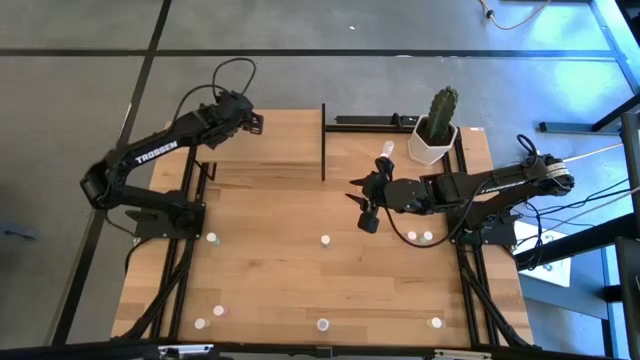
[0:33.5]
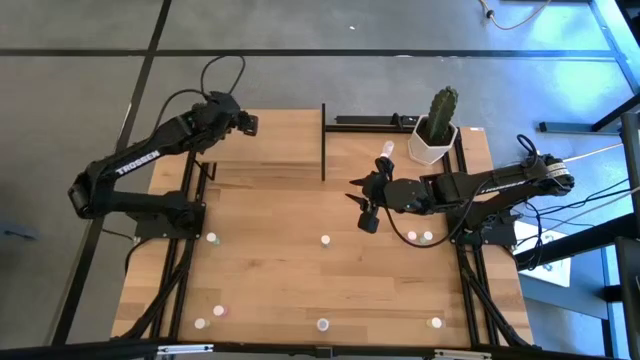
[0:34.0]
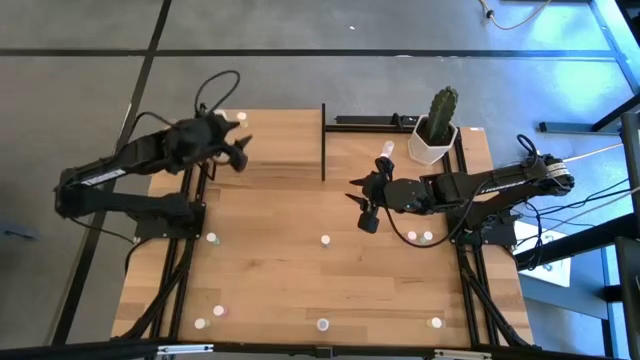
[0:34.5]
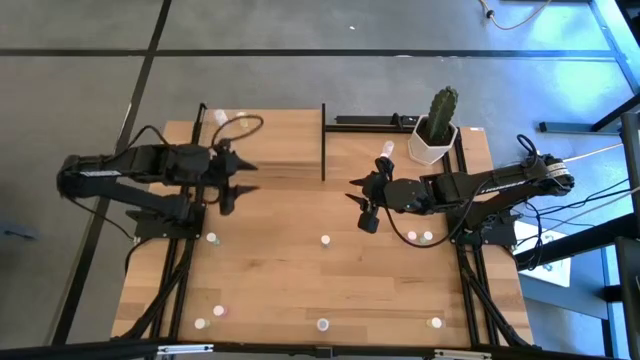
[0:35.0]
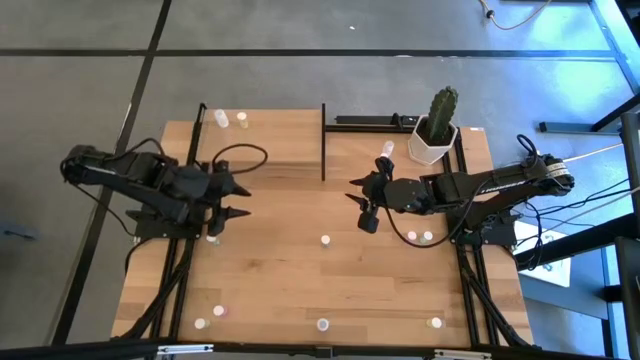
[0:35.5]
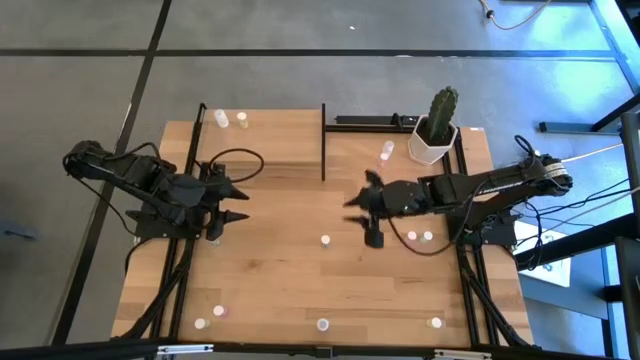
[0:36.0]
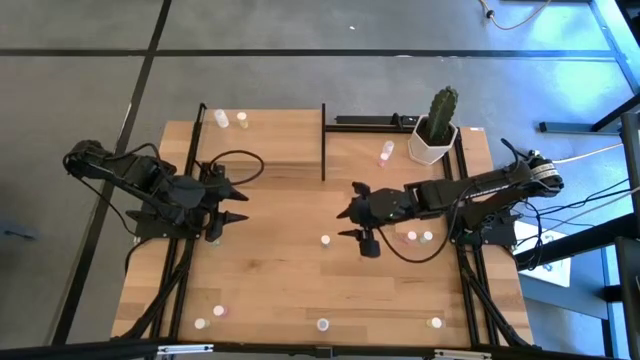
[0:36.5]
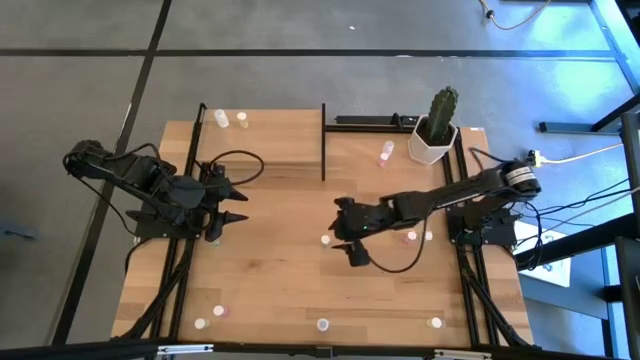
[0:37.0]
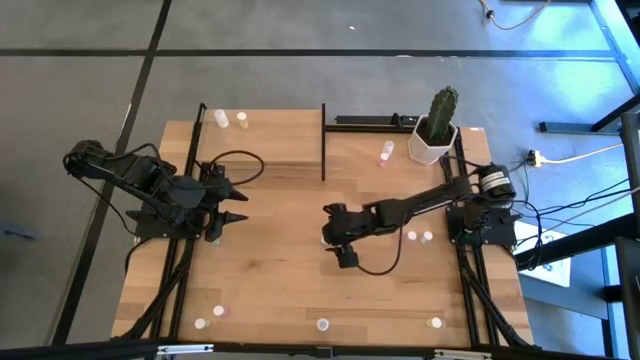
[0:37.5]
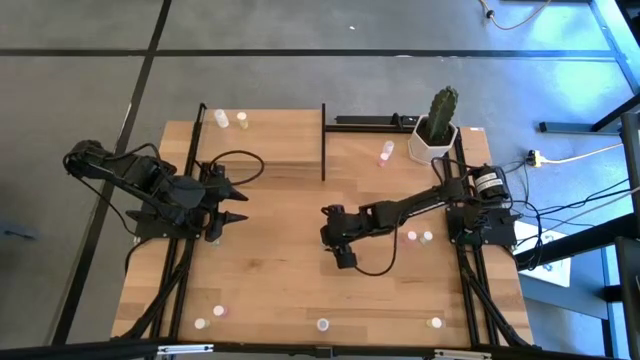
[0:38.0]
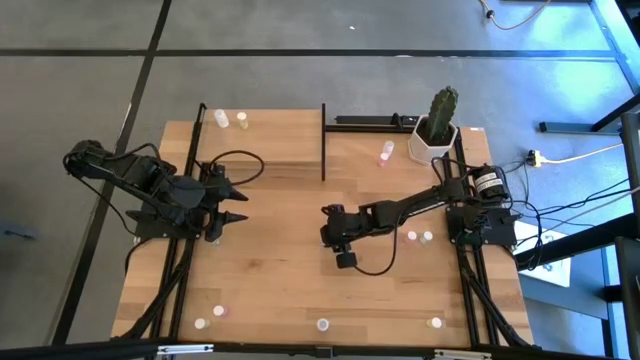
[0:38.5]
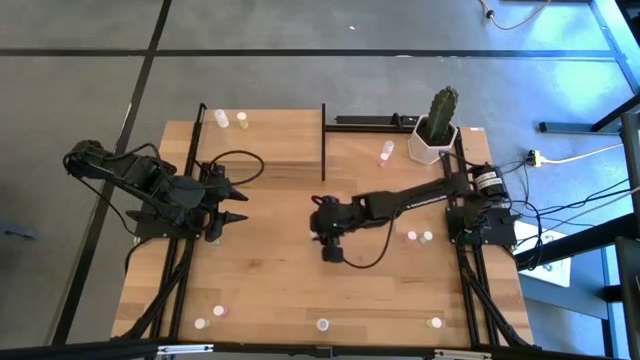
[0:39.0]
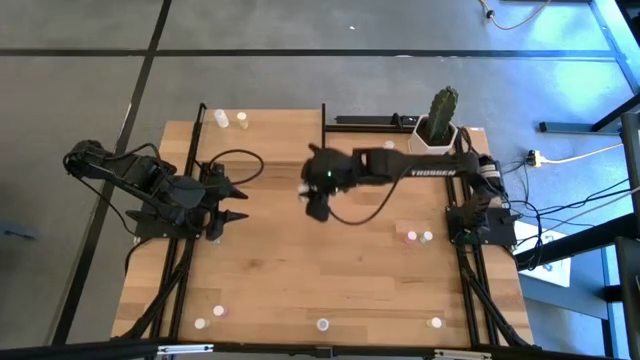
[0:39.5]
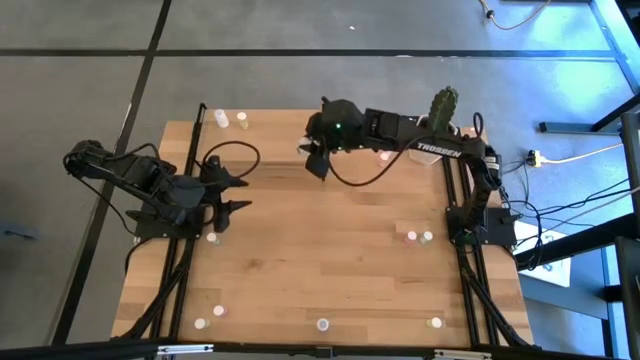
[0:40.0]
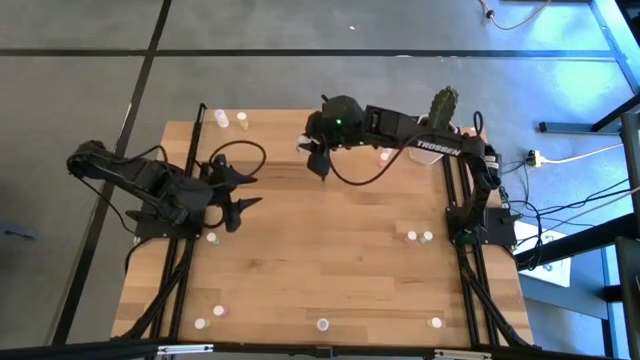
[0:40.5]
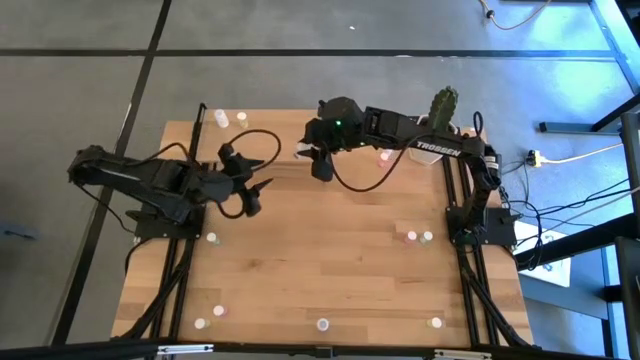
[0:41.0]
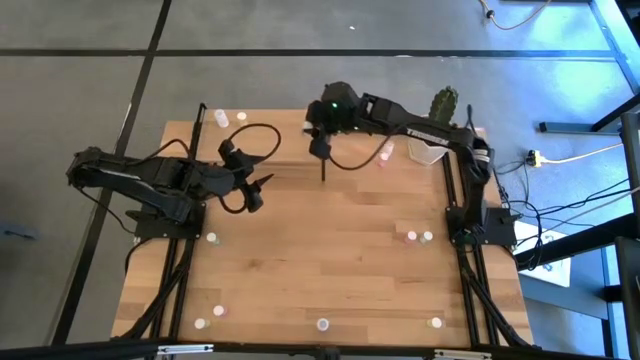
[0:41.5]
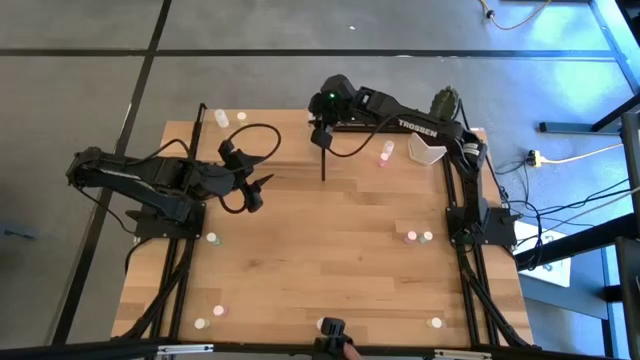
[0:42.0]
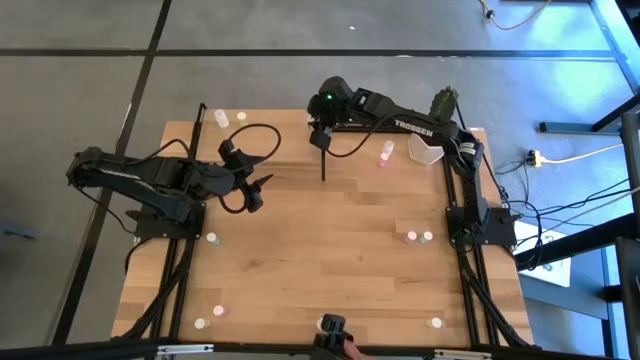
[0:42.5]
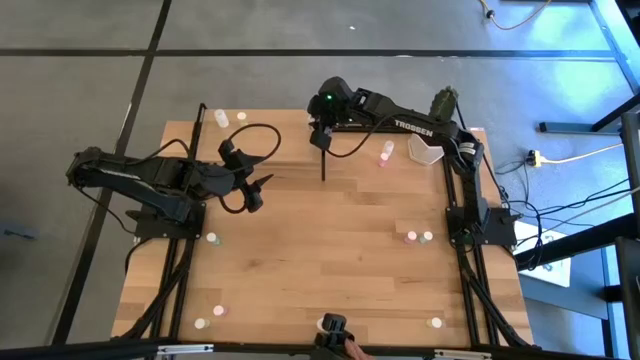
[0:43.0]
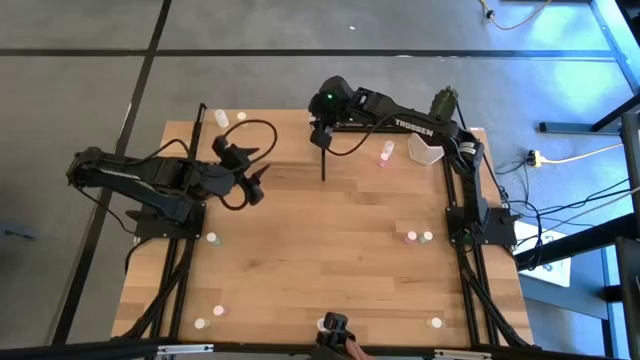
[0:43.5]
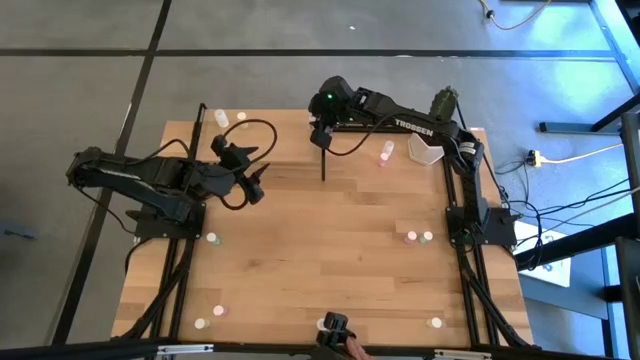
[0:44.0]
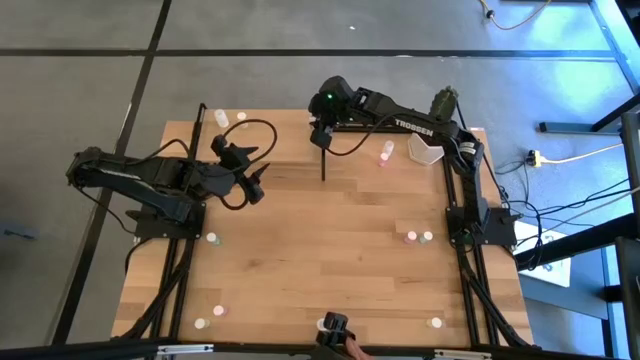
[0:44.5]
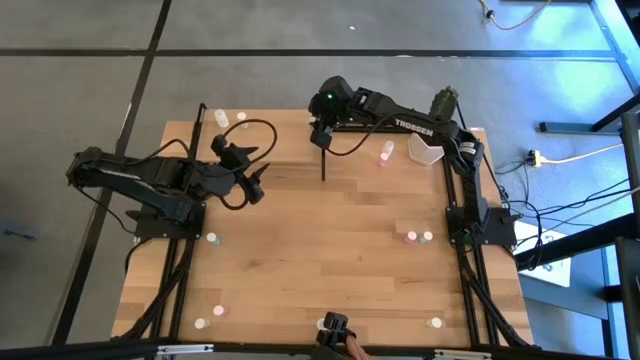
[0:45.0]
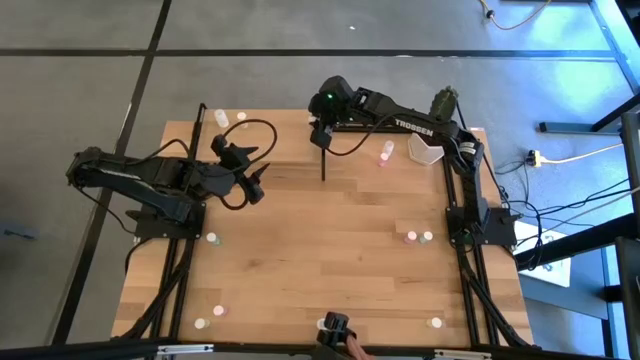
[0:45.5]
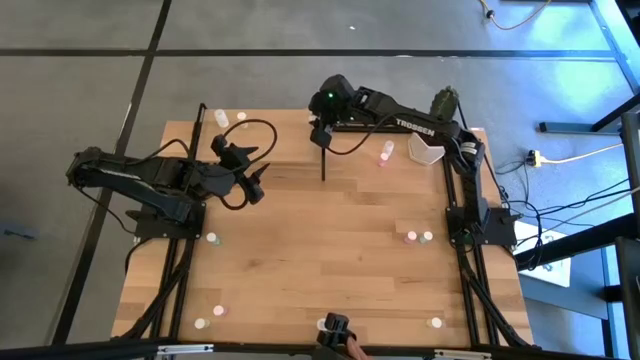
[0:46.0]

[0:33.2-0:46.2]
Task: Pick and place medicine bottles onto shelf by color
Put the middle green pill bottle on the shelf

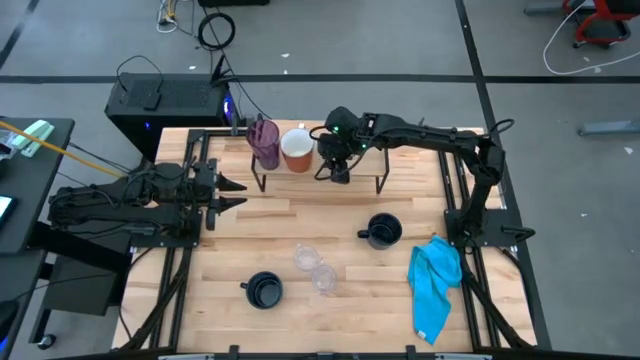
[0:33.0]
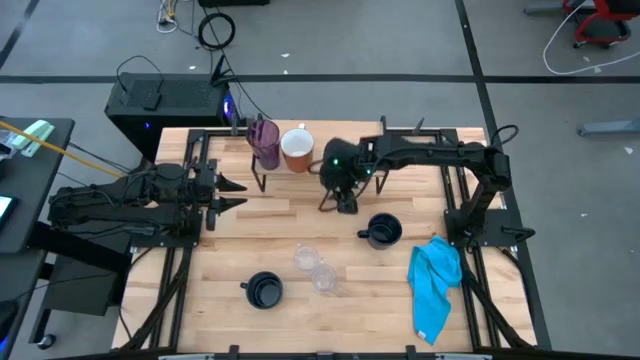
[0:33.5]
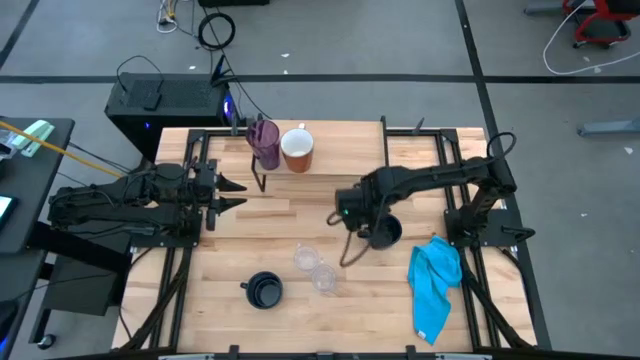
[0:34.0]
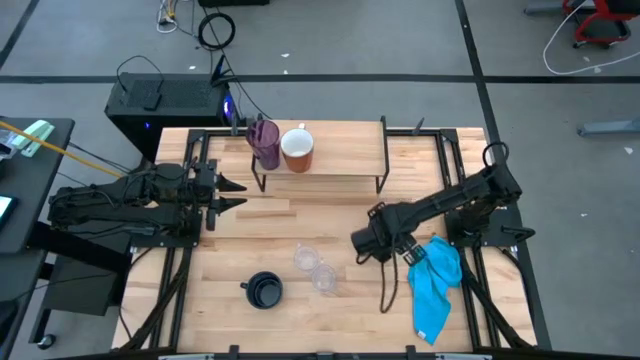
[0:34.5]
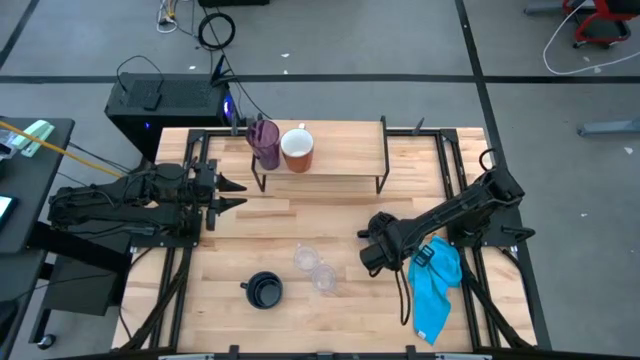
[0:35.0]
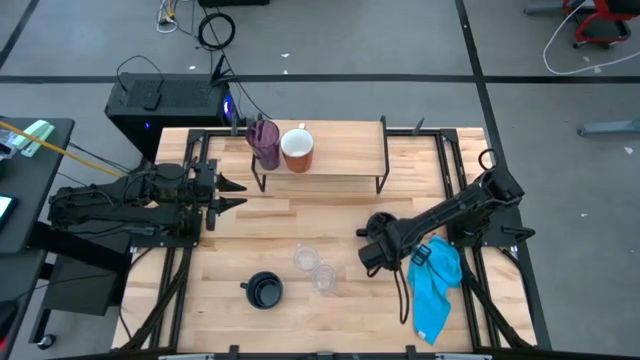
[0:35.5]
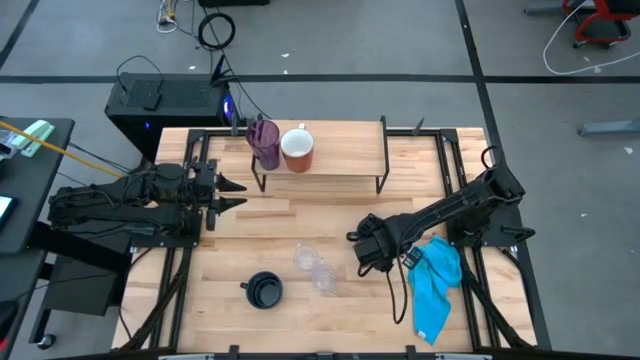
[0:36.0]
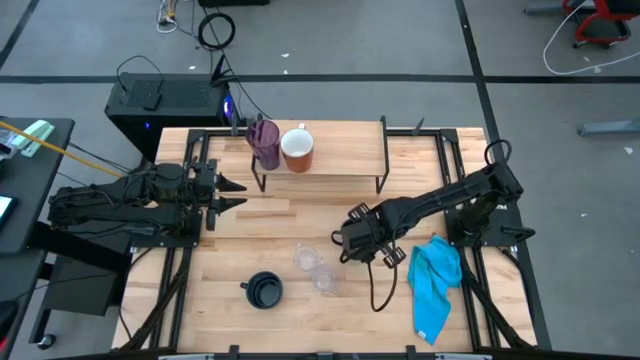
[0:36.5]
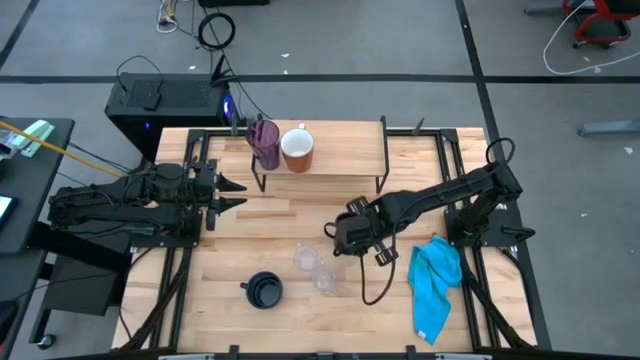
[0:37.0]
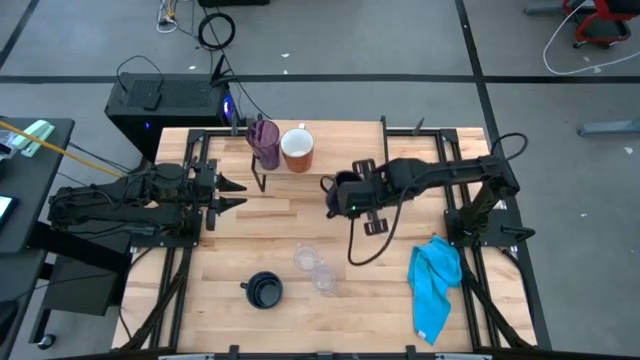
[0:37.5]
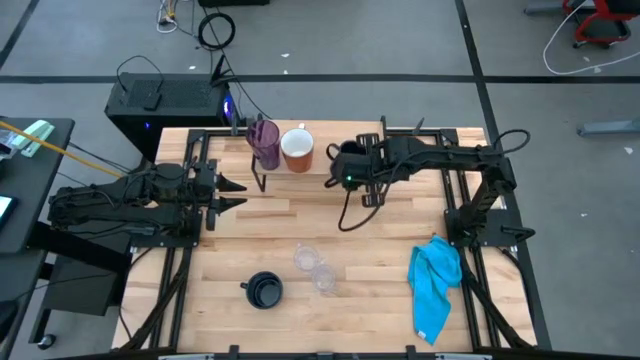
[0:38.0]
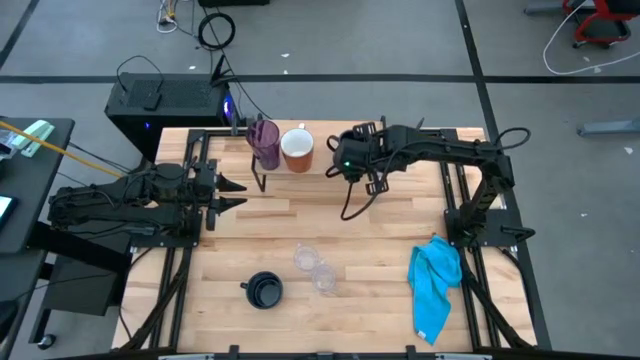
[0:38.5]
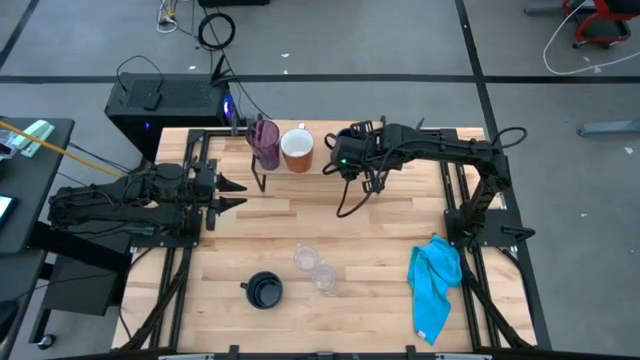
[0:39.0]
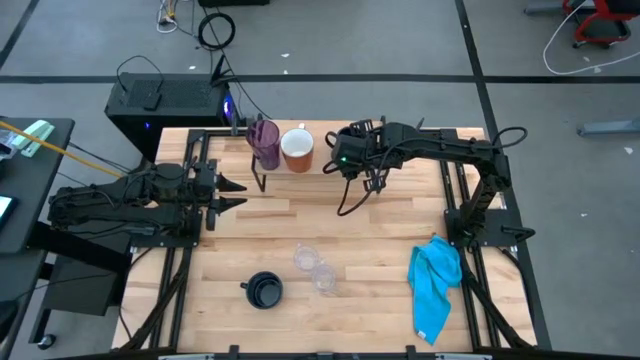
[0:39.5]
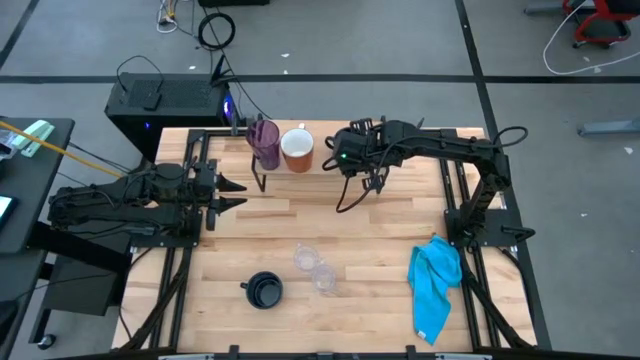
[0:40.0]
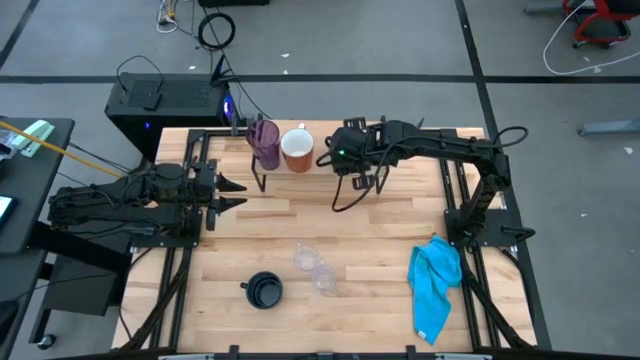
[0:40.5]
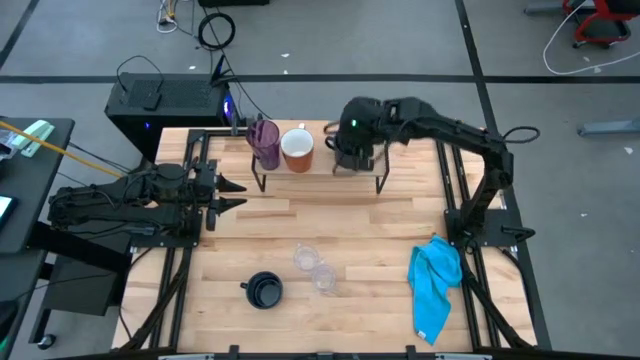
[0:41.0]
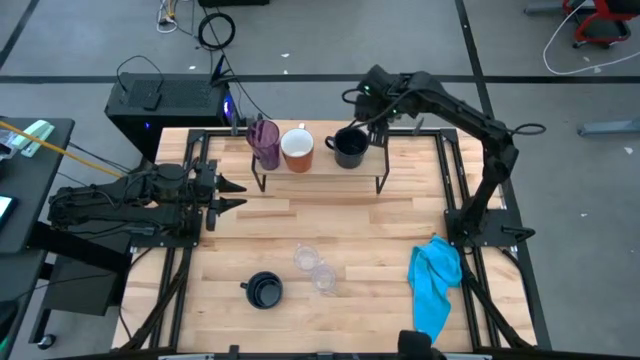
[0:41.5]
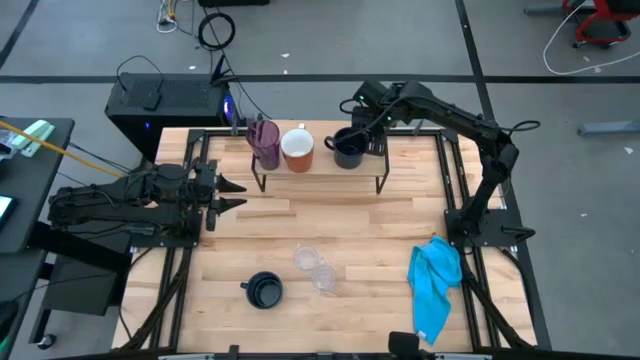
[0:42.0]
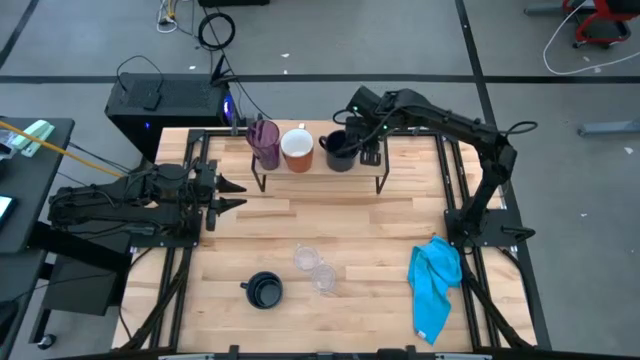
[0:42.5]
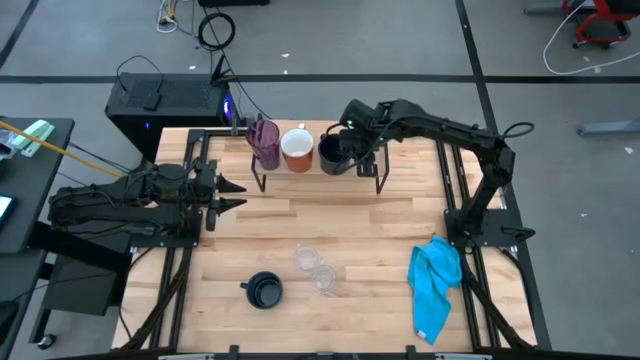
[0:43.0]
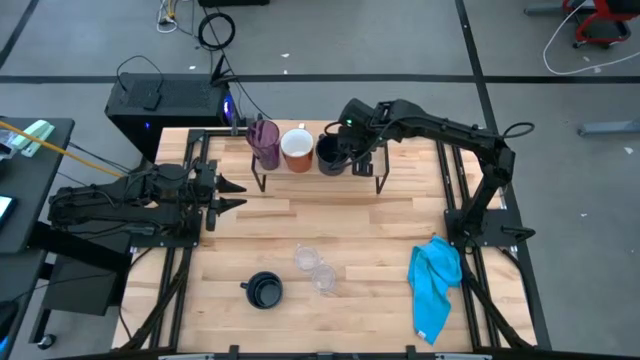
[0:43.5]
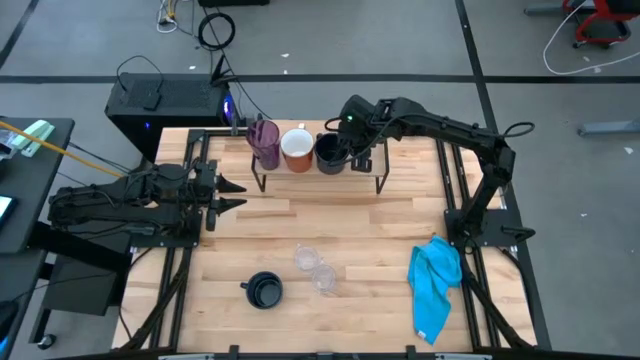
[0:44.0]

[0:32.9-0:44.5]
Task: Stack small to large cups/mugs on shelf
Put the top dark blue mug on the shelf
